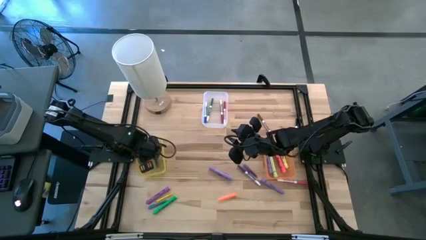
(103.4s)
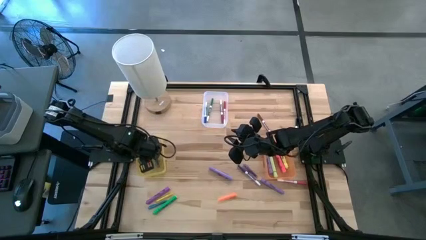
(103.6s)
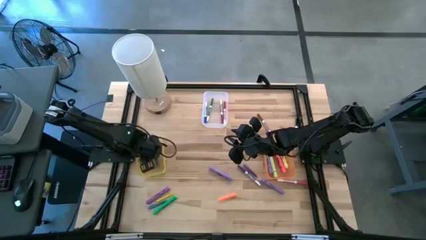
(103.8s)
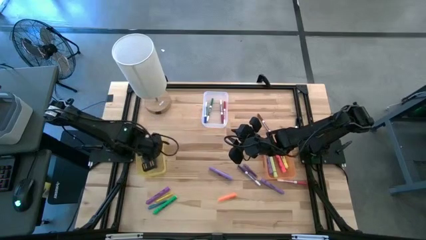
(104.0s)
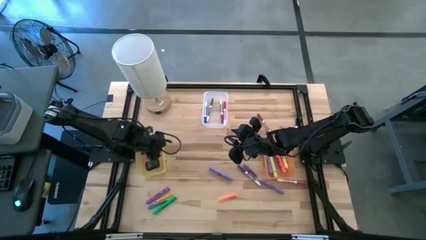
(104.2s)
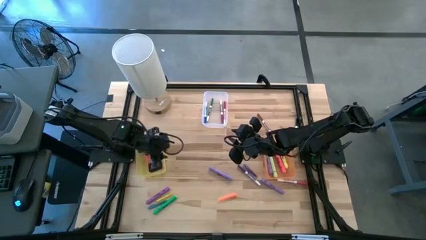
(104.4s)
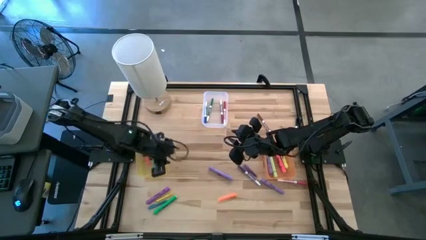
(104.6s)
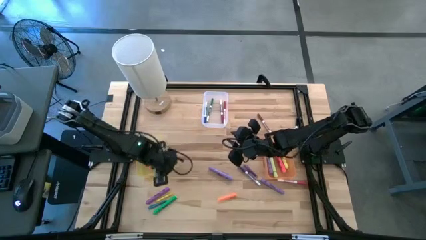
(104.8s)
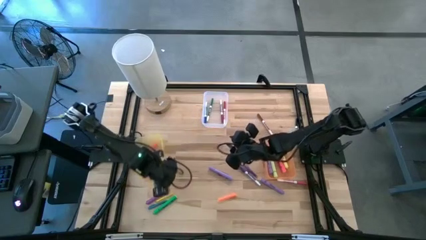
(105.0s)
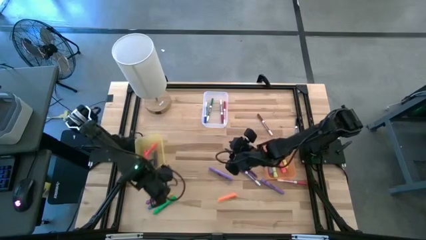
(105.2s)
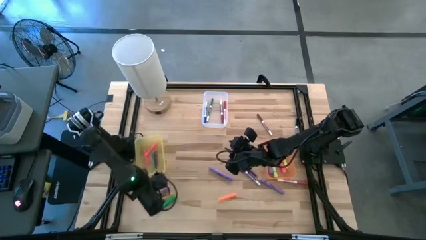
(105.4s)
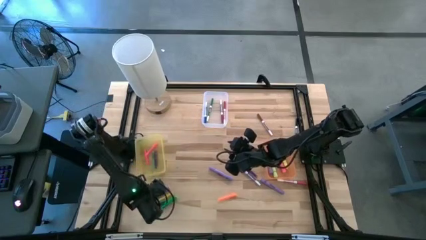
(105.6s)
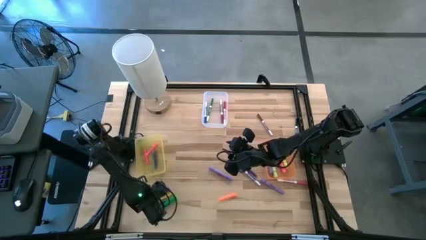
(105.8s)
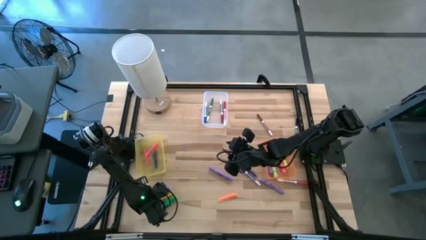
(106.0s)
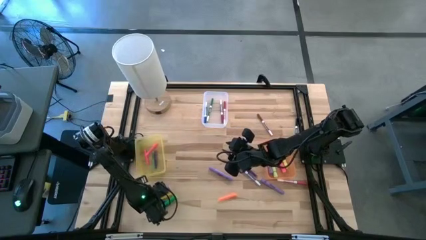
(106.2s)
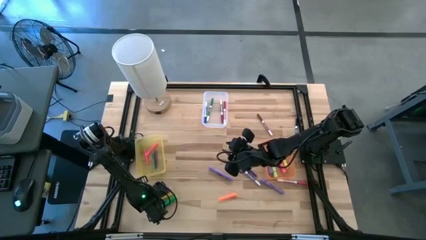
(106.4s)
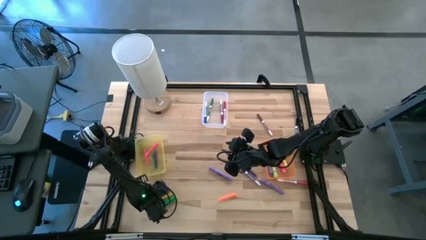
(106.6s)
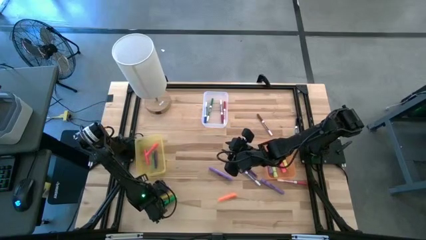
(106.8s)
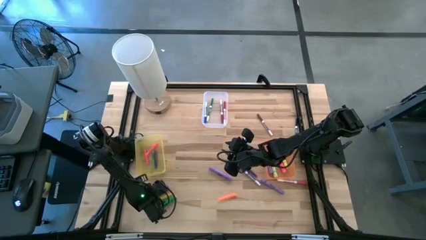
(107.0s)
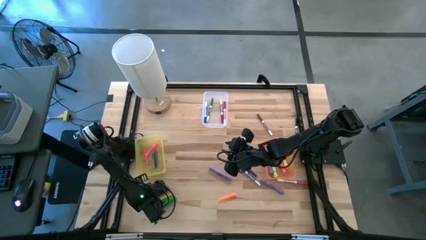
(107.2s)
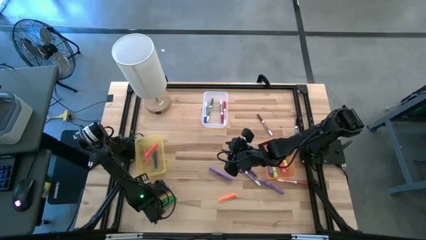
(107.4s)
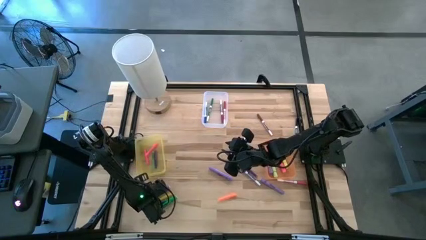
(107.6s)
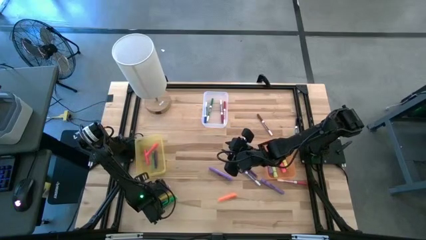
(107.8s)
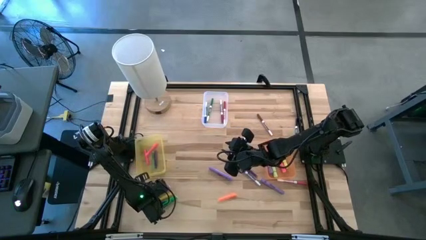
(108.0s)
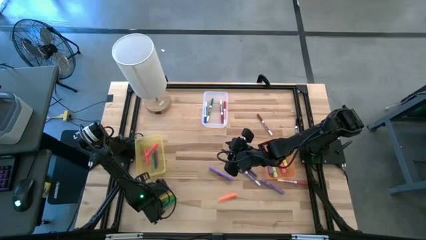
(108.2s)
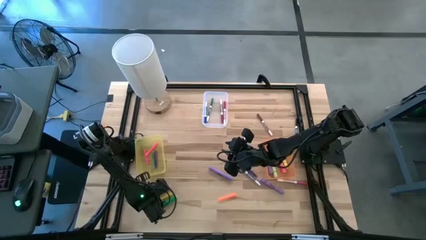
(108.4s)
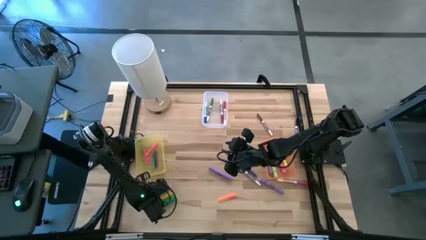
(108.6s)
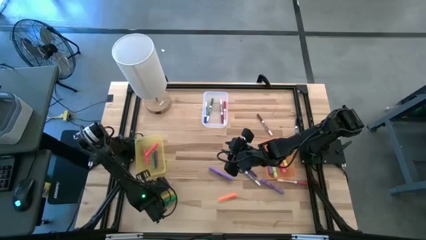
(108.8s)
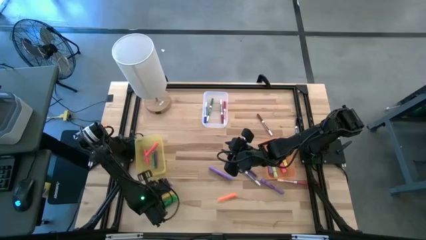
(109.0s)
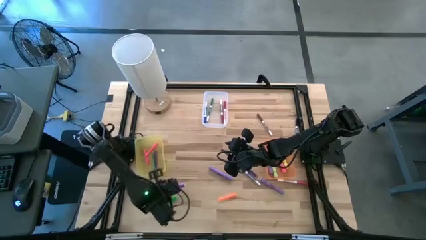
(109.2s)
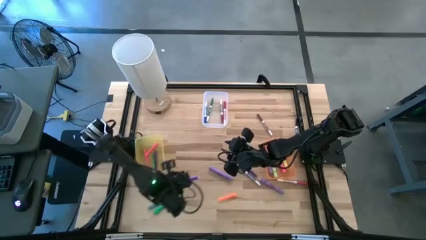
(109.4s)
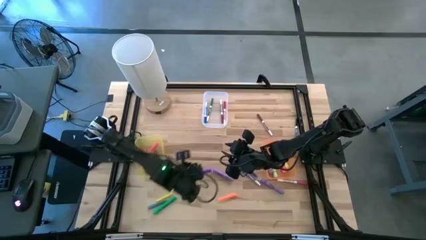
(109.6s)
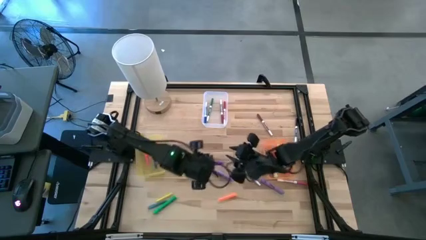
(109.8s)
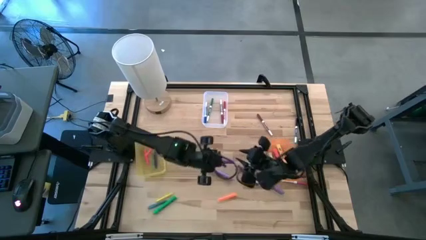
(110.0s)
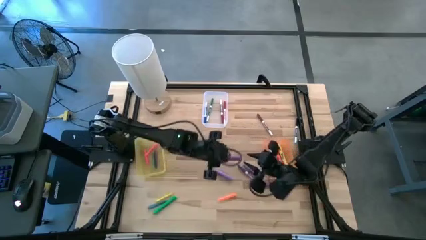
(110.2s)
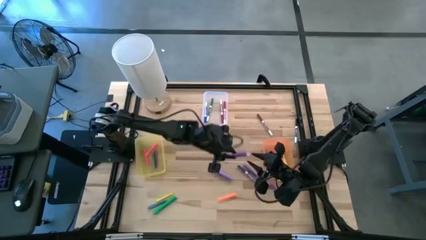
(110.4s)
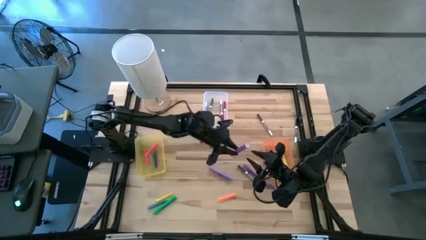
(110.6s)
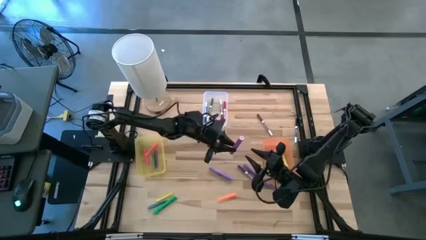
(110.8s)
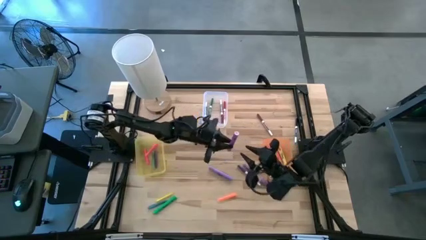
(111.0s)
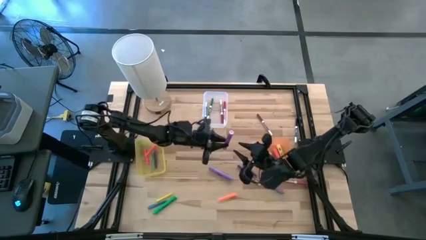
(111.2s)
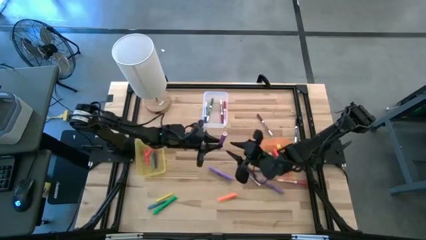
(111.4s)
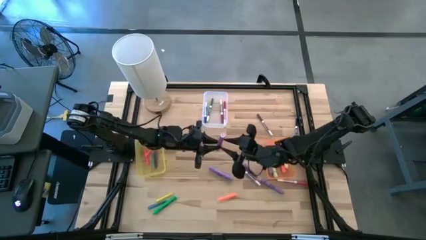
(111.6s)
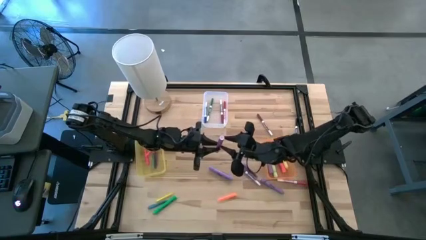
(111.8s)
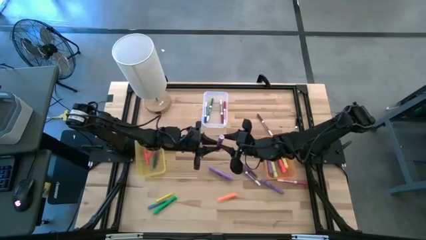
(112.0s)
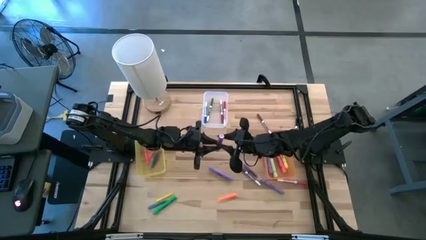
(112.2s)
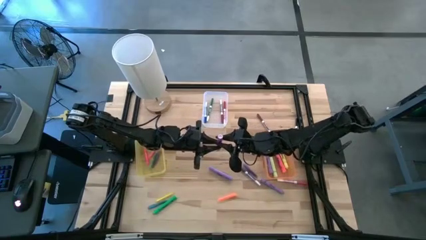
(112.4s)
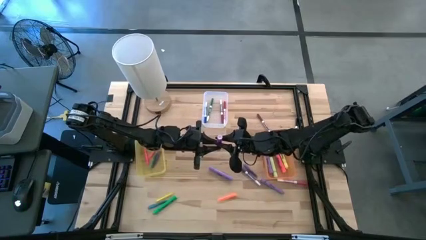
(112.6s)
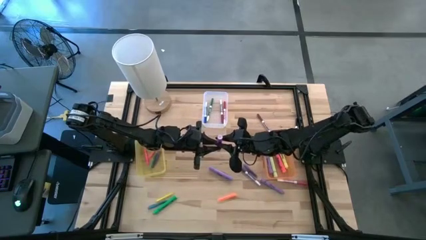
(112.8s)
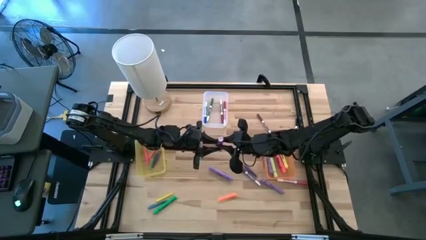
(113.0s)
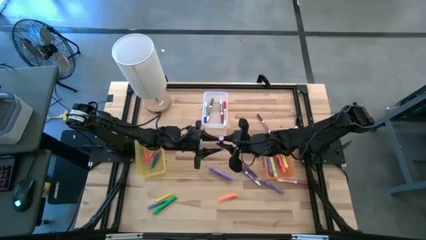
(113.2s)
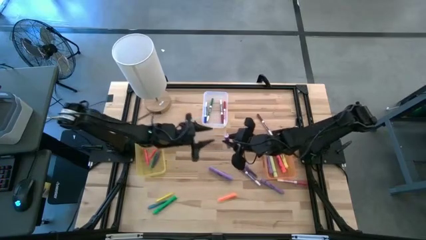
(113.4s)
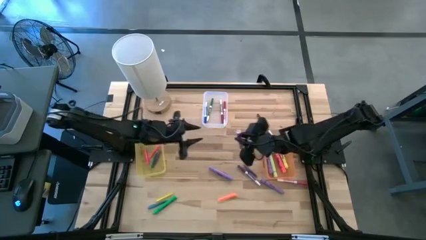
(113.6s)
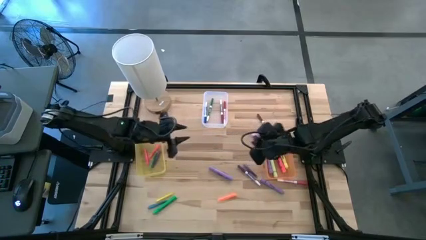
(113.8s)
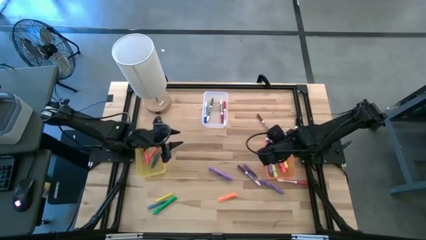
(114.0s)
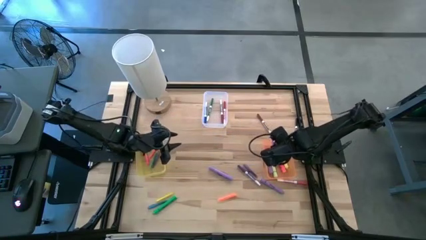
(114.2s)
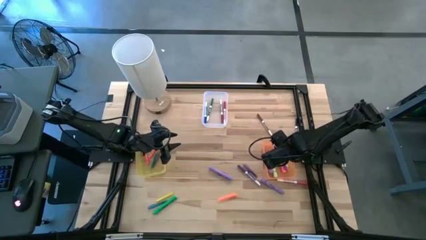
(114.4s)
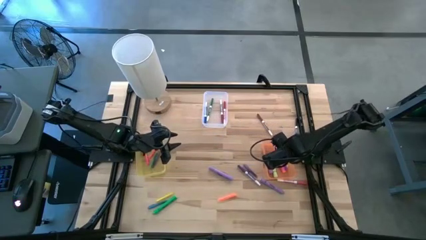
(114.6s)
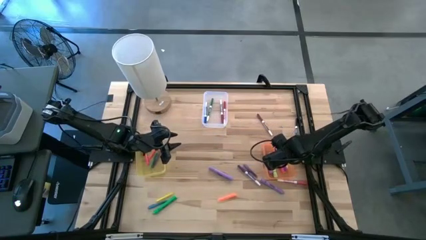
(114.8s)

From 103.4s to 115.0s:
Task: Pick & Place Markers
Put the purple highlighter pen into the orange bin

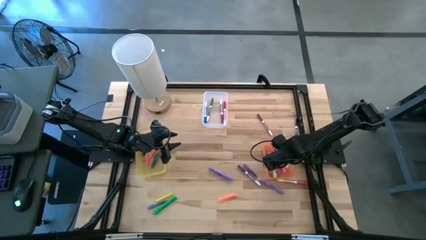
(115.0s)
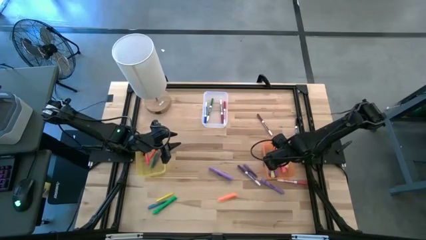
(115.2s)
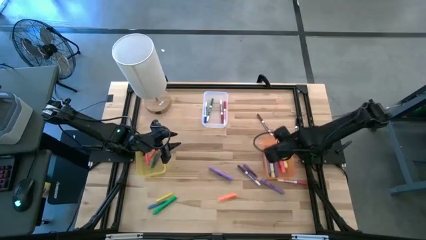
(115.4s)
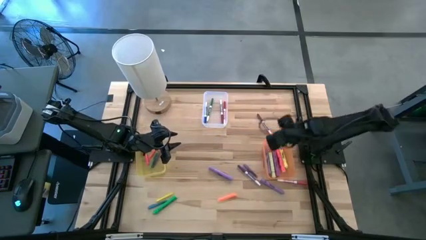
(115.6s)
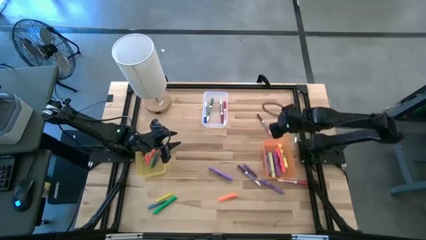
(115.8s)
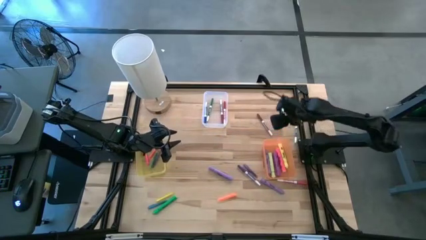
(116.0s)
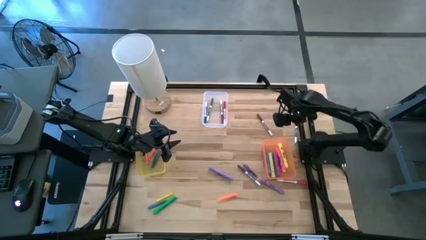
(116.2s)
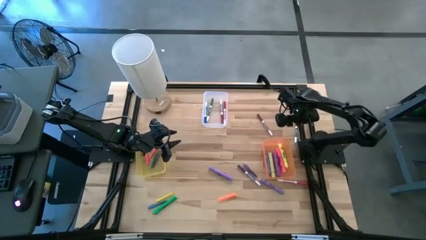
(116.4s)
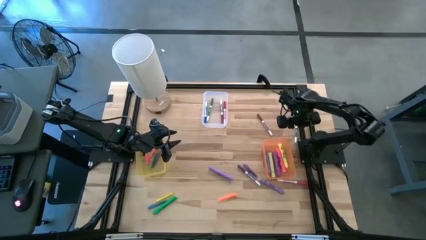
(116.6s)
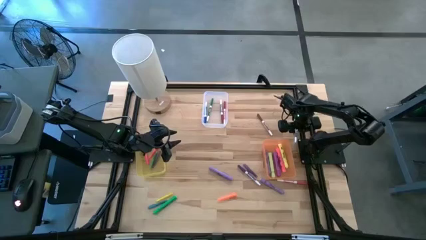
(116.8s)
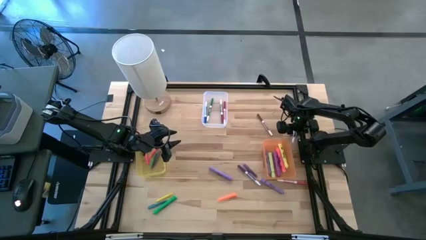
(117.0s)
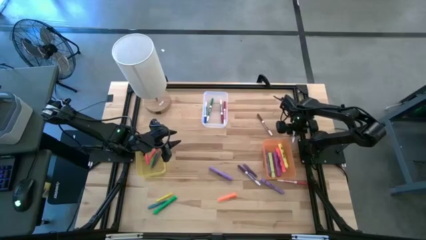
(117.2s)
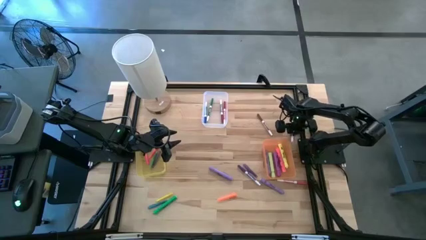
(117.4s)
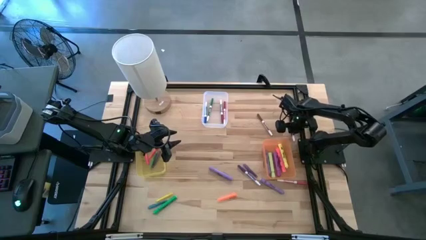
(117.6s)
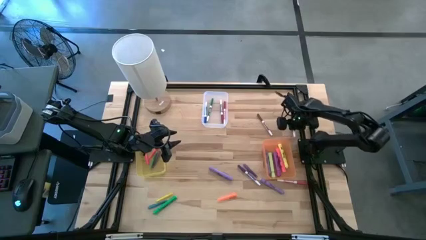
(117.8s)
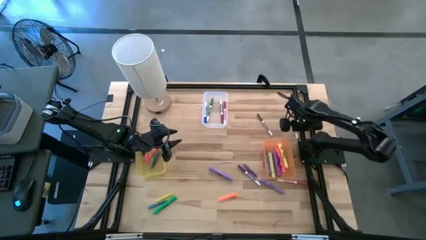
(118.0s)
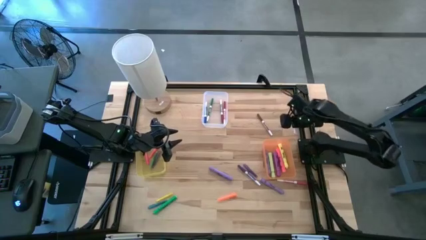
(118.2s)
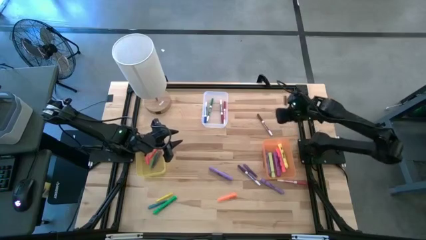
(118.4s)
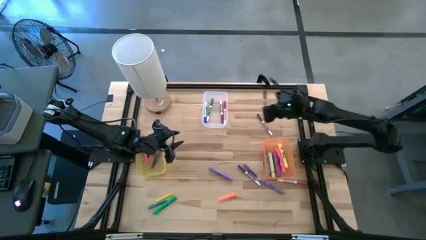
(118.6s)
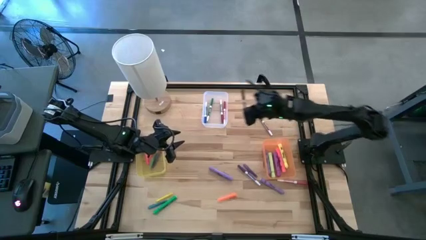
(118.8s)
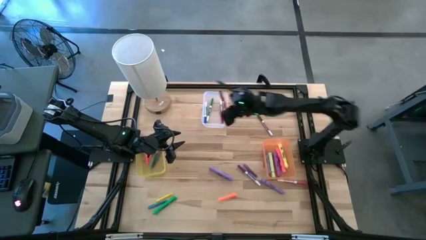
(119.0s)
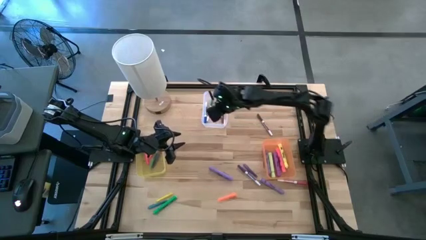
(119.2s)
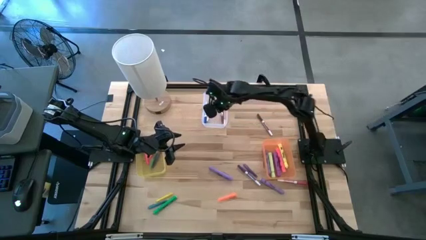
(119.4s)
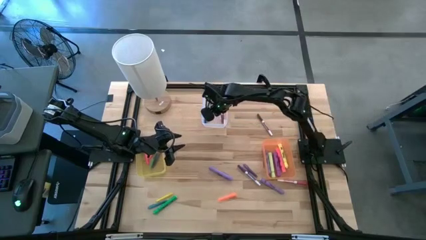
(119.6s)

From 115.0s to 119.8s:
Put the black marker pen into the transparent bin
